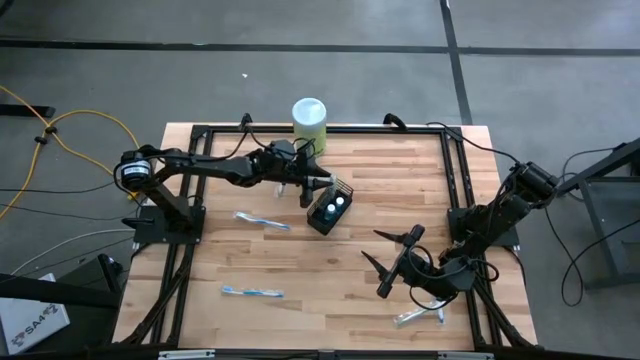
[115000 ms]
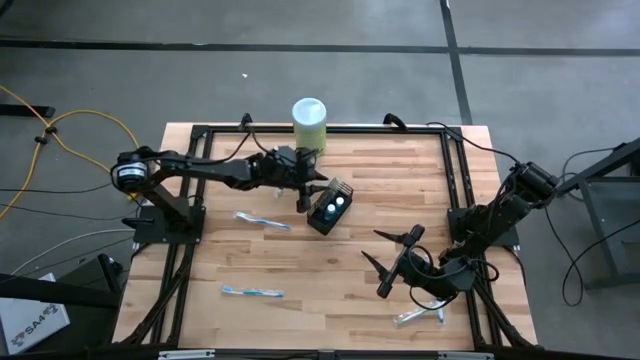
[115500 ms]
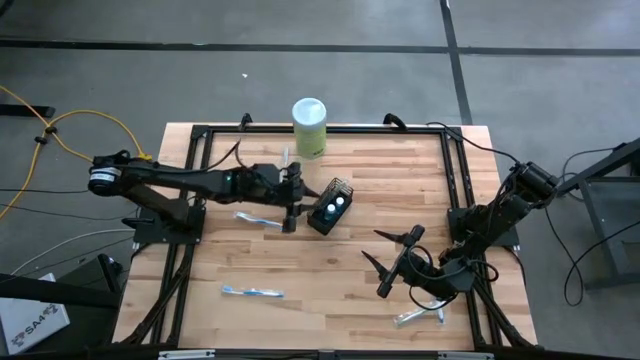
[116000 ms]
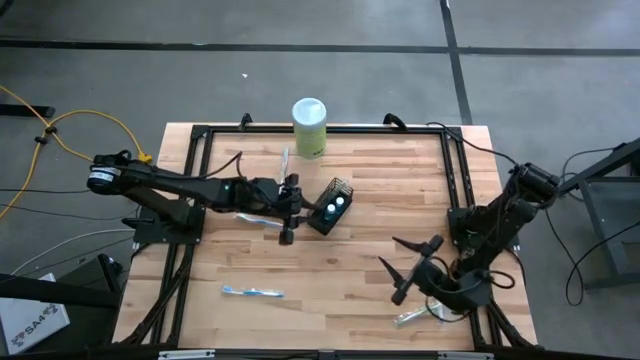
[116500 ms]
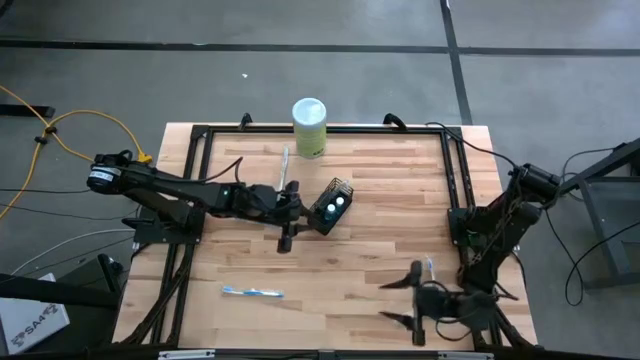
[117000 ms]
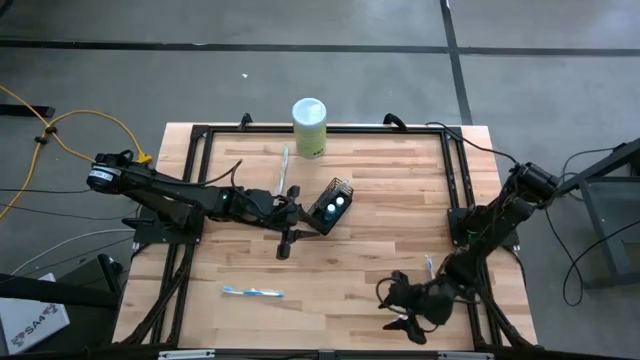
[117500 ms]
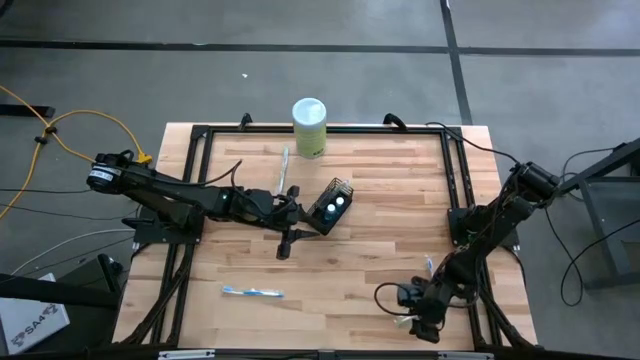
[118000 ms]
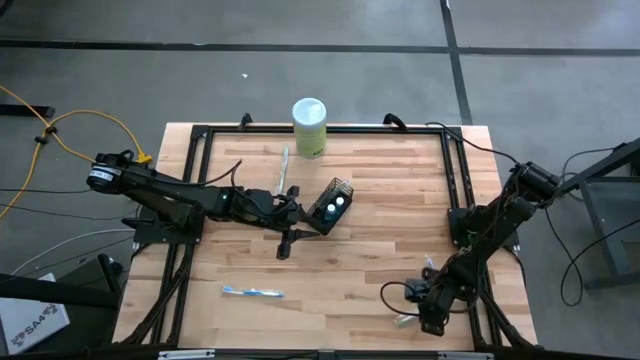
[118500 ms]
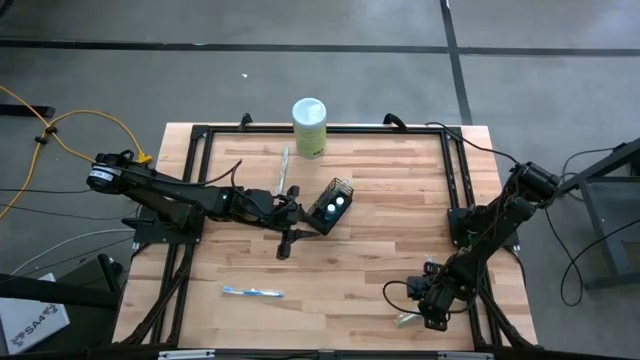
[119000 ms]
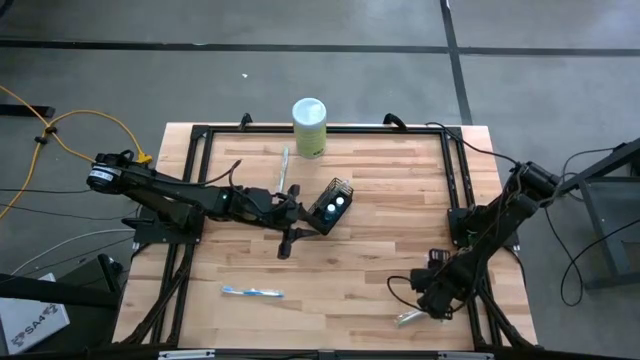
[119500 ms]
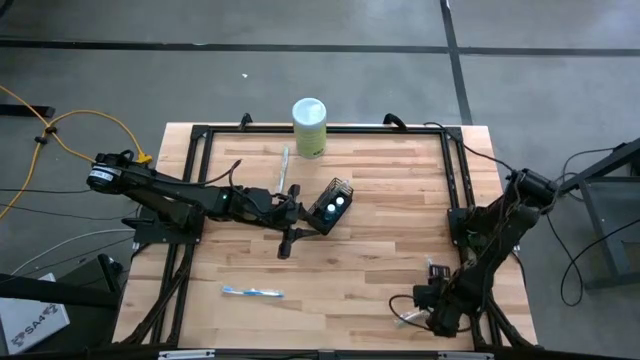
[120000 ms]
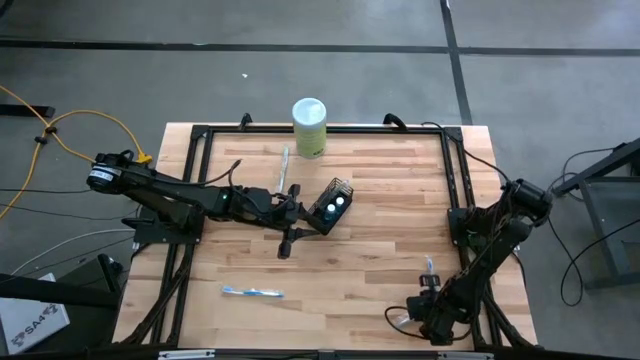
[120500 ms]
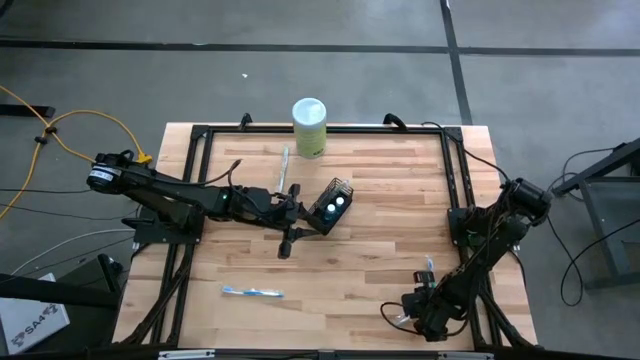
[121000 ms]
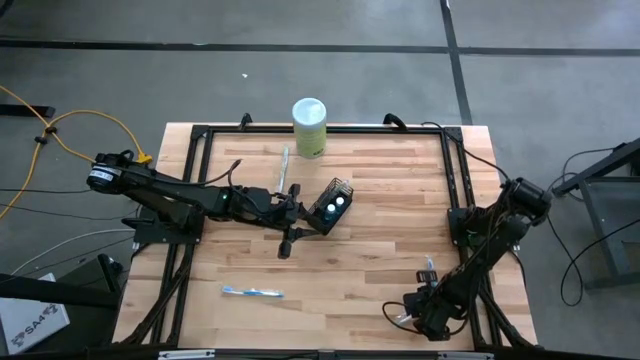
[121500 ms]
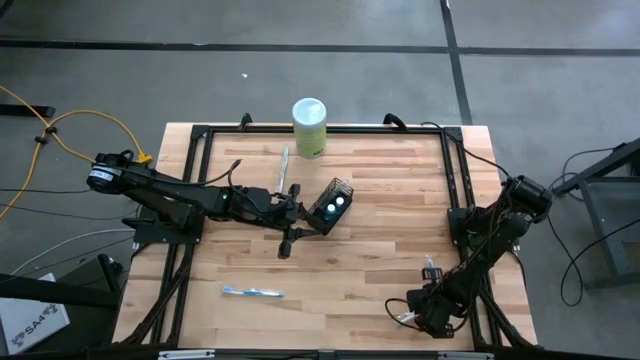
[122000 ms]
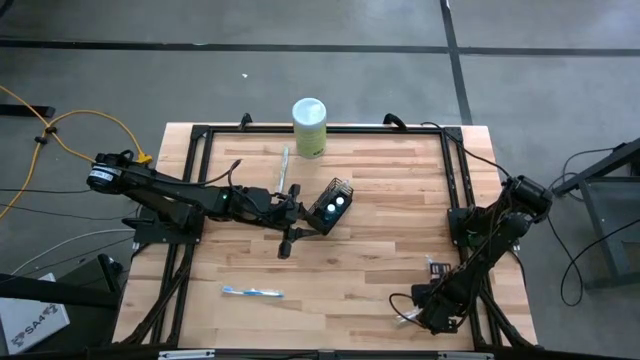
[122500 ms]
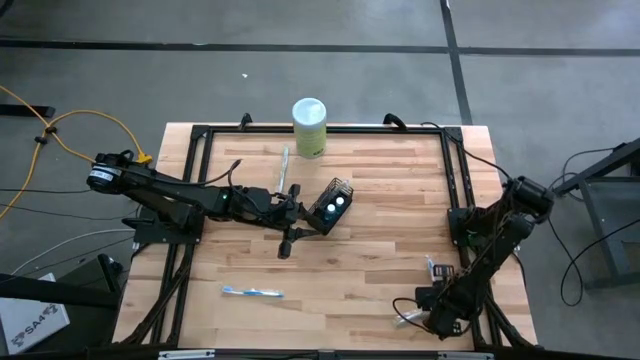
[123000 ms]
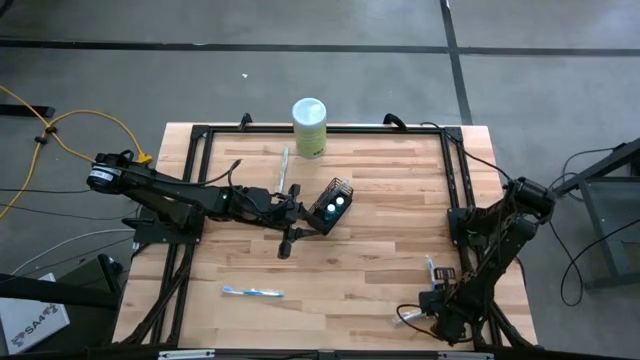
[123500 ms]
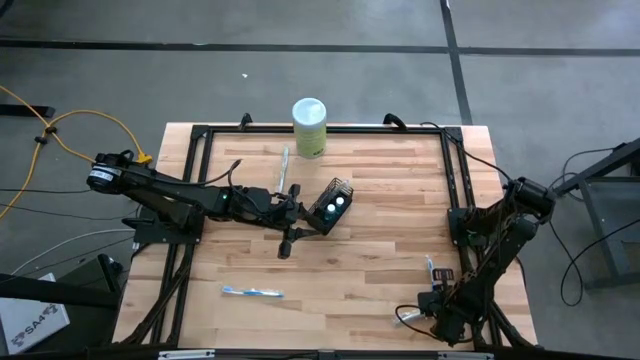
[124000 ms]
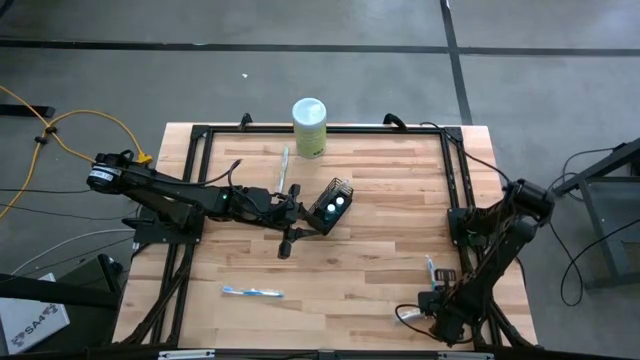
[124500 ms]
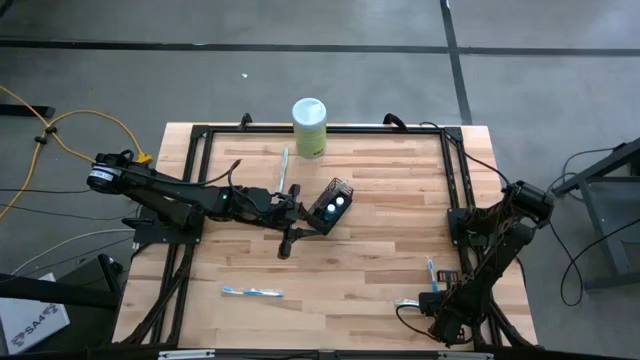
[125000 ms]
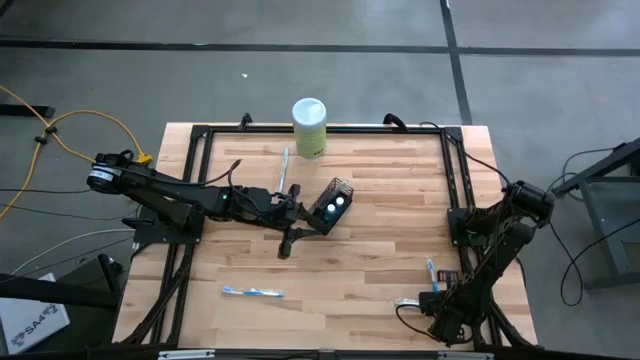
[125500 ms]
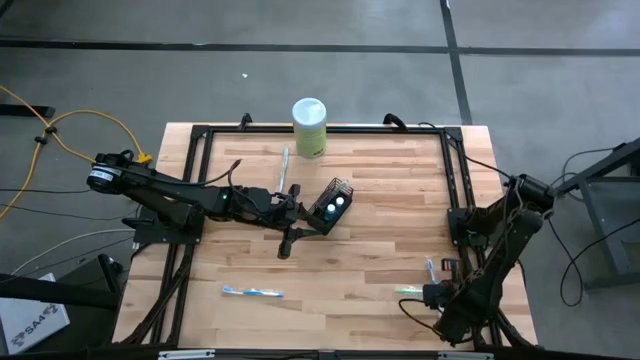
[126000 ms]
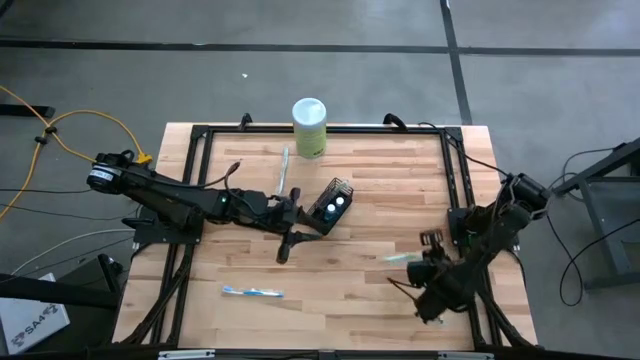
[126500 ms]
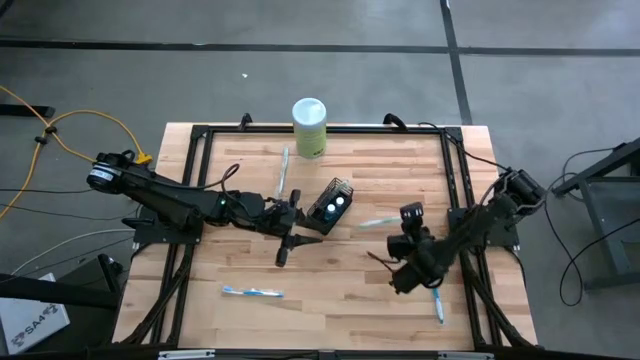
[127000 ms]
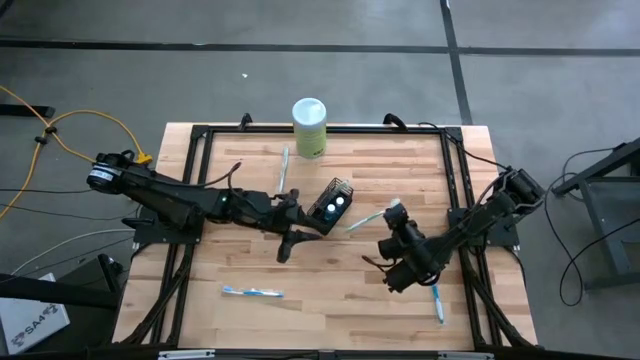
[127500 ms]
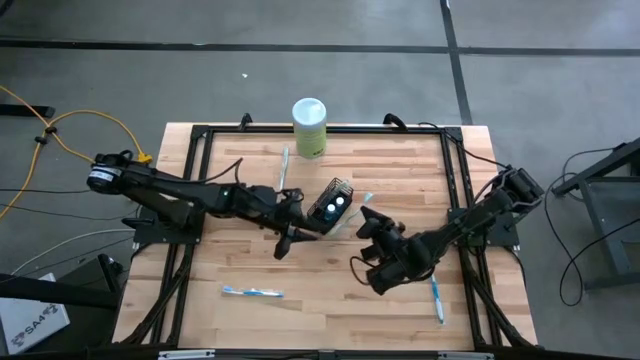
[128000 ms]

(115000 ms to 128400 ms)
Task: Pick & Place toothbrushing station
Put the bottom right green toothbrush into the right section of the black wire organizer

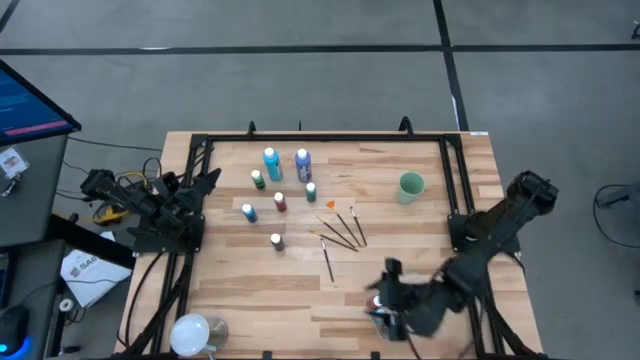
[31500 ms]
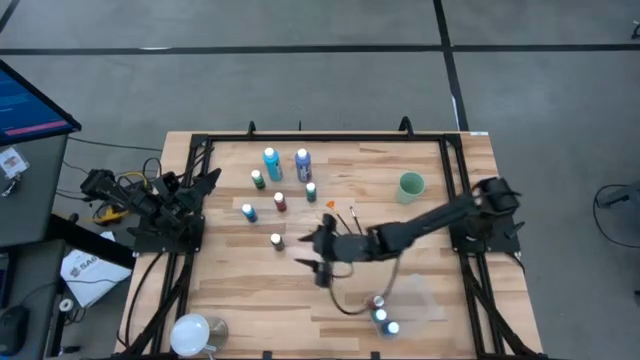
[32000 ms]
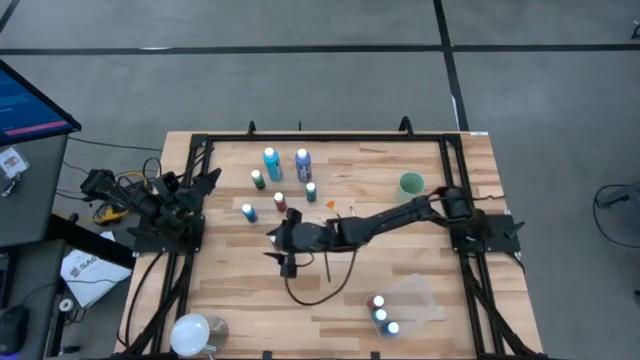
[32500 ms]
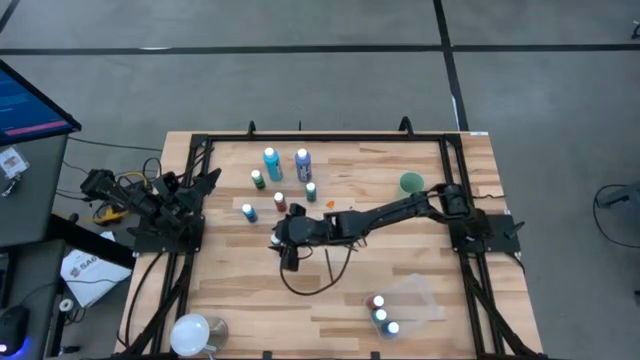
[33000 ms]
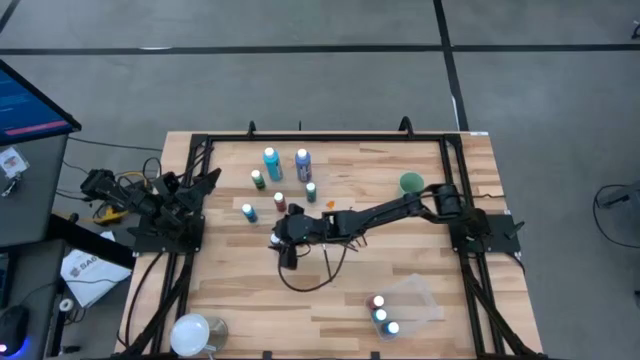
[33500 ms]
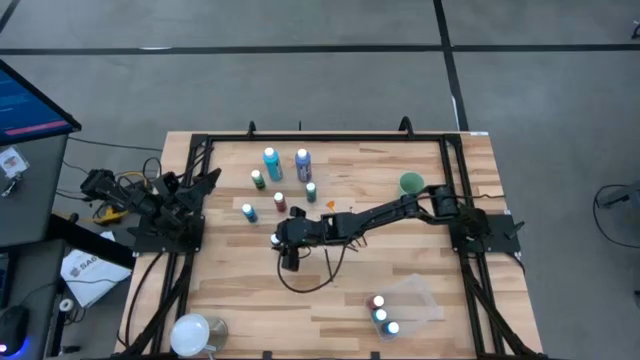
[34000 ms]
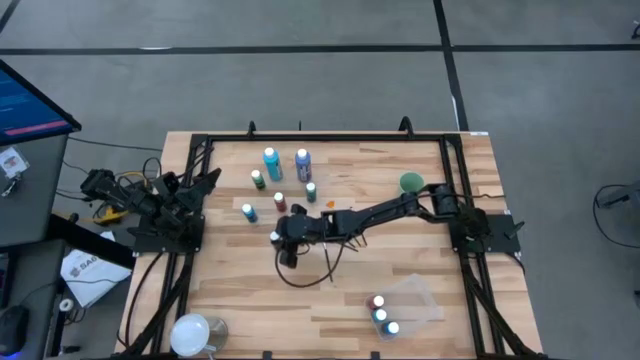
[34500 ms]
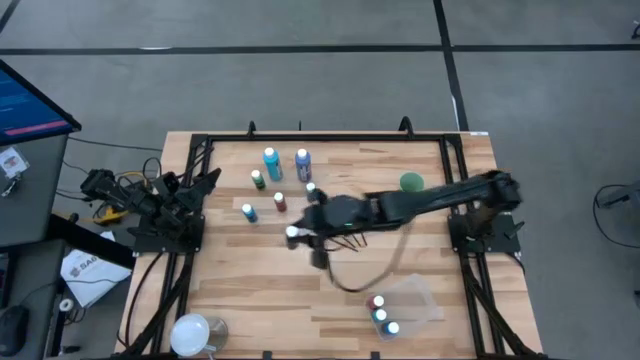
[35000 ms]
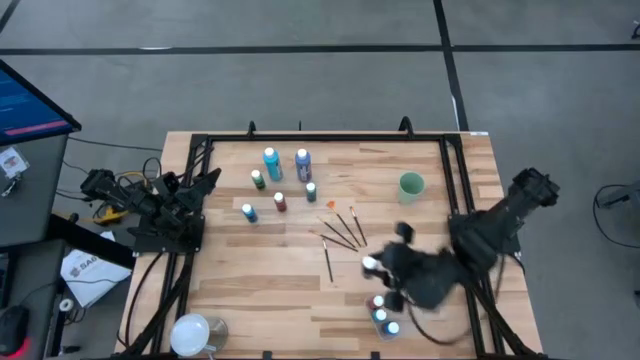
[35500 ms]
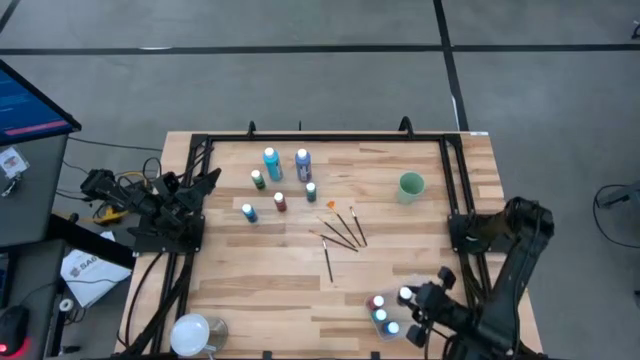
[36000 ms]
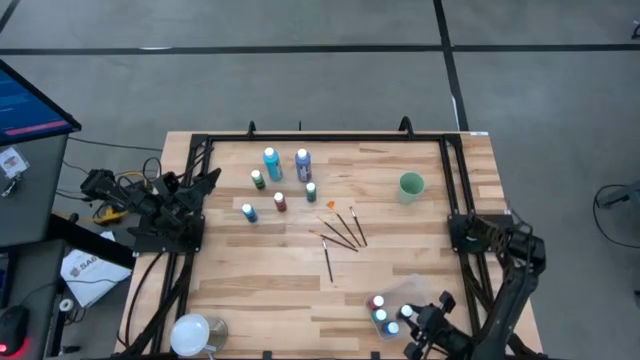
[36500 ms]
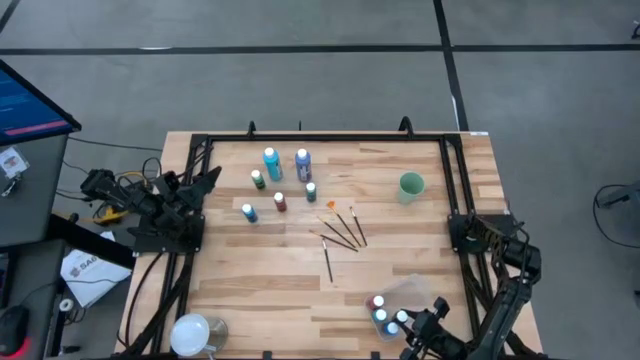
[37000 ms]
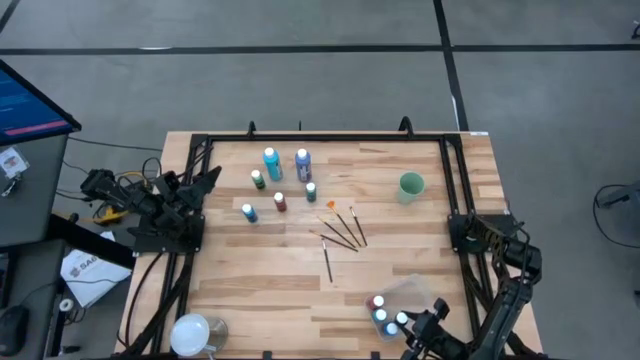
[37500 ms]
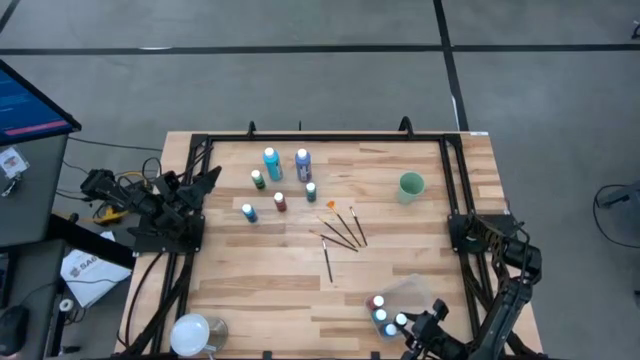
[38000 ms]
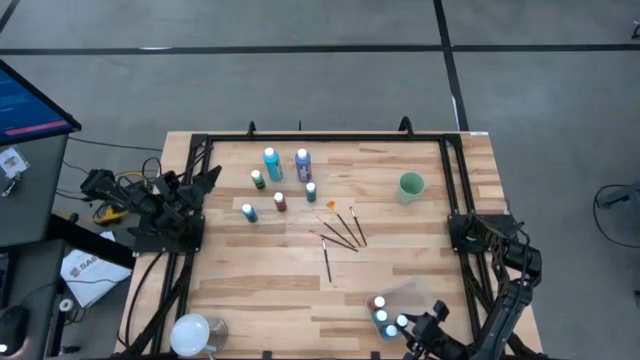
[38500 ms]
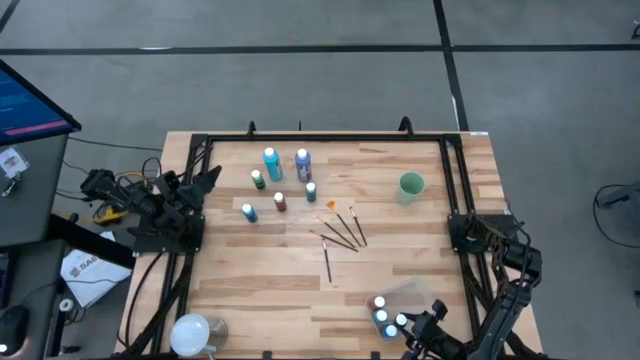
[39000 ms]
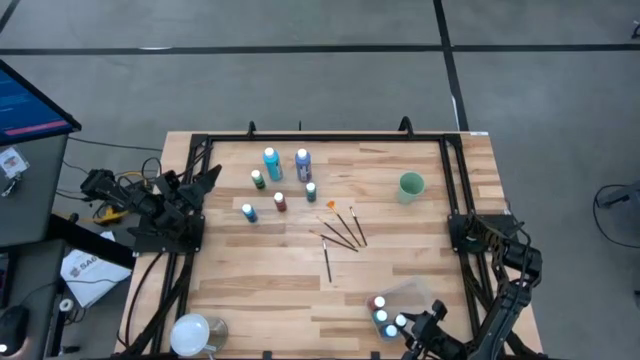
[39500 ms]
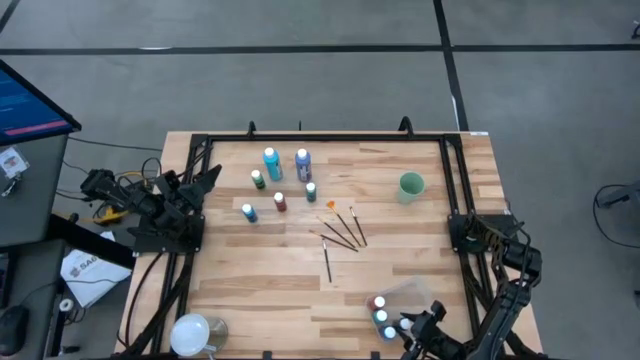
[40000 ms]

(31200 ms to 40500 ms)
Task: Pick & Place Paint Supplies
Put the black paint bottle into the transparent bin
